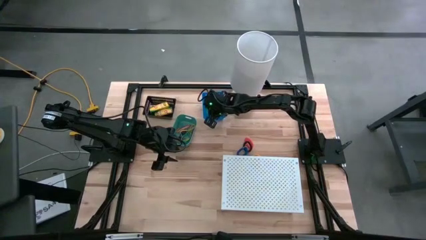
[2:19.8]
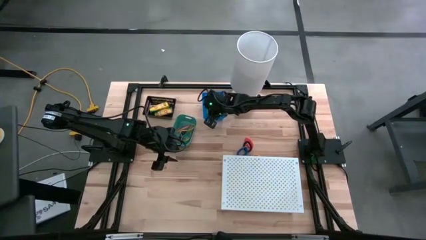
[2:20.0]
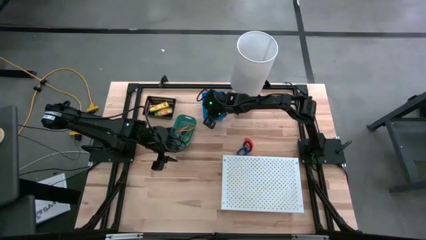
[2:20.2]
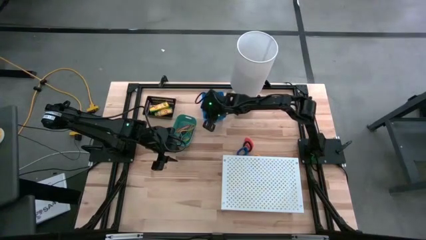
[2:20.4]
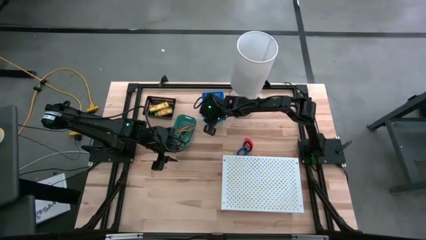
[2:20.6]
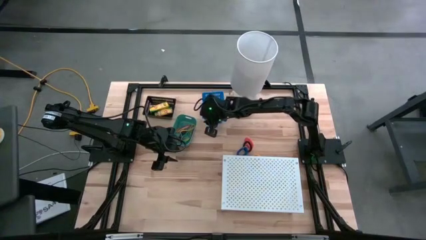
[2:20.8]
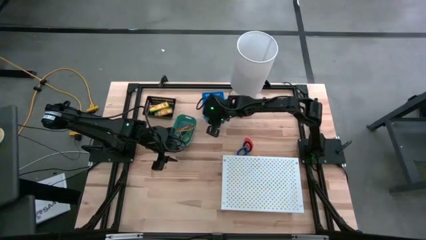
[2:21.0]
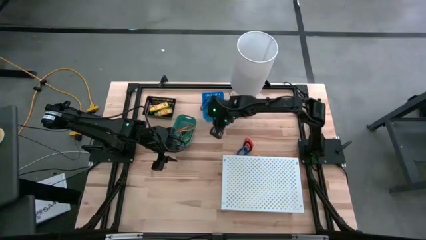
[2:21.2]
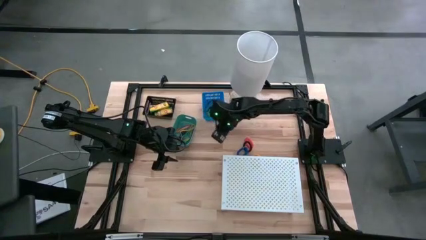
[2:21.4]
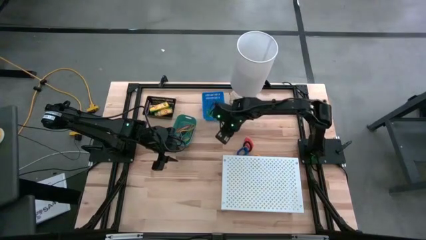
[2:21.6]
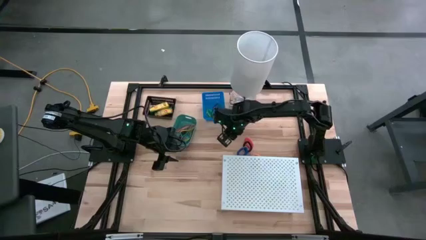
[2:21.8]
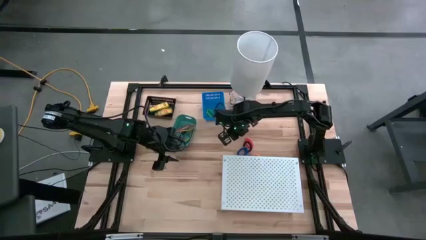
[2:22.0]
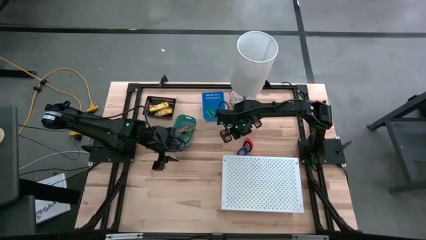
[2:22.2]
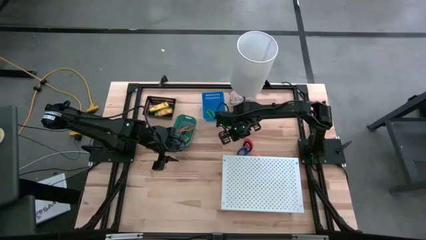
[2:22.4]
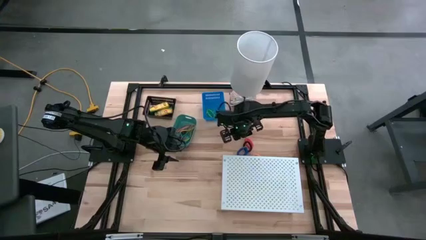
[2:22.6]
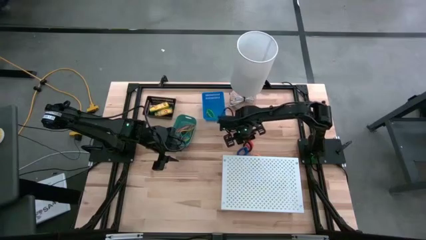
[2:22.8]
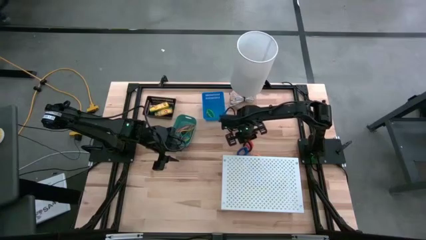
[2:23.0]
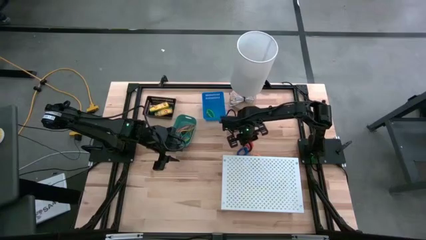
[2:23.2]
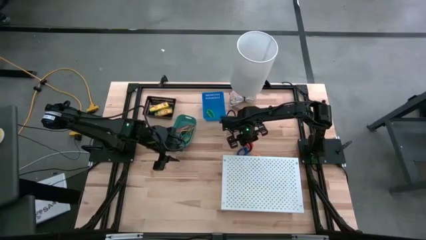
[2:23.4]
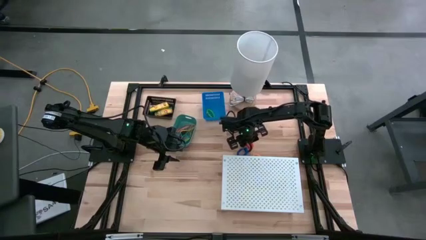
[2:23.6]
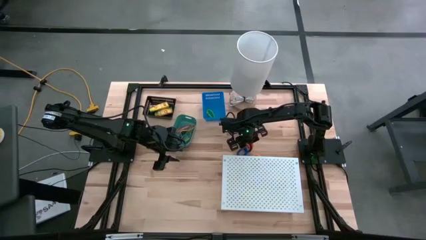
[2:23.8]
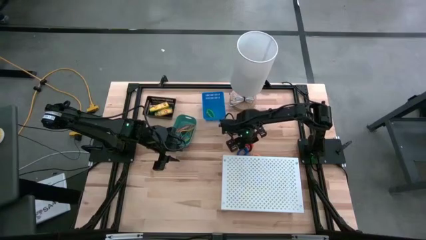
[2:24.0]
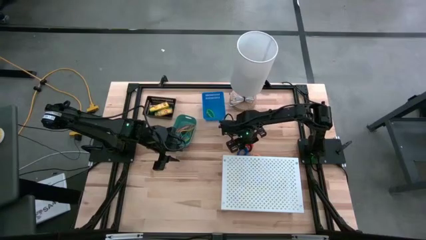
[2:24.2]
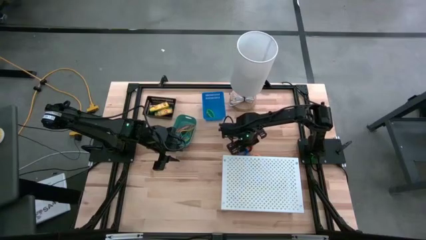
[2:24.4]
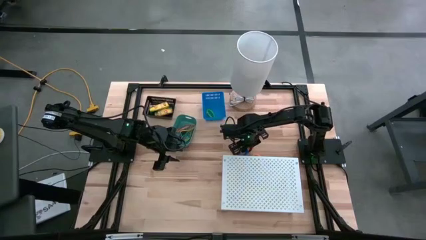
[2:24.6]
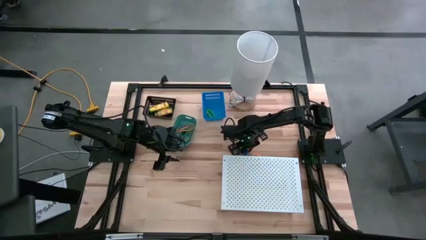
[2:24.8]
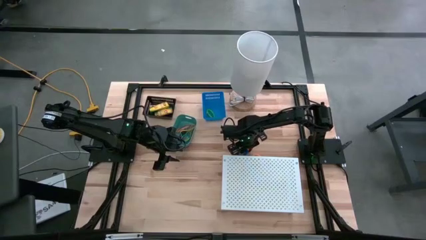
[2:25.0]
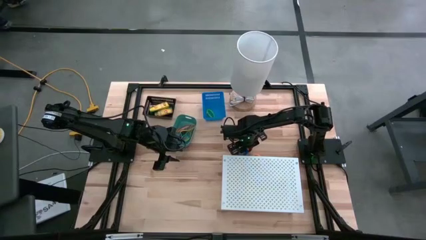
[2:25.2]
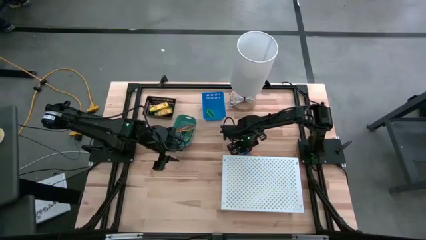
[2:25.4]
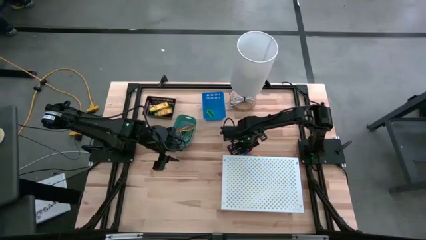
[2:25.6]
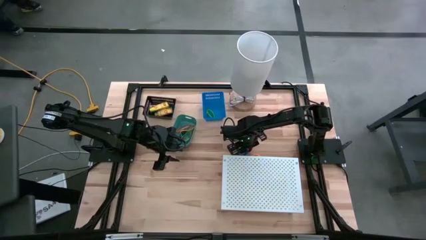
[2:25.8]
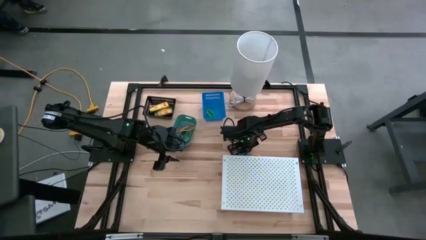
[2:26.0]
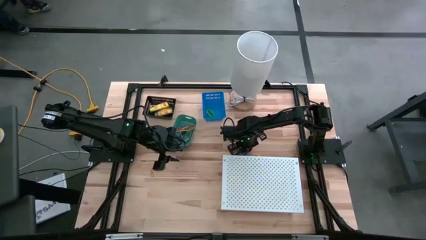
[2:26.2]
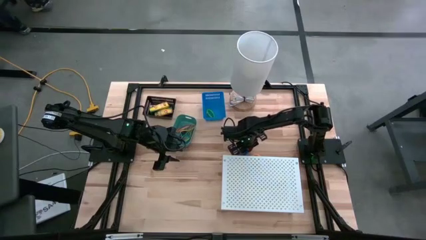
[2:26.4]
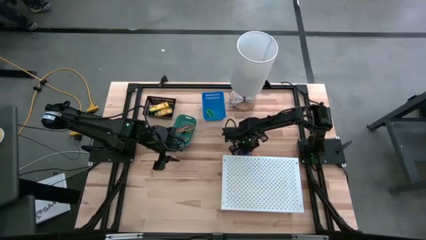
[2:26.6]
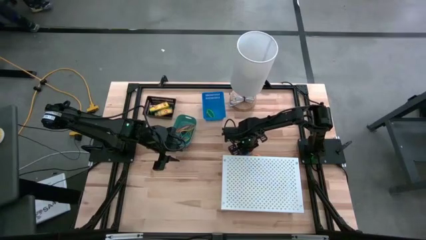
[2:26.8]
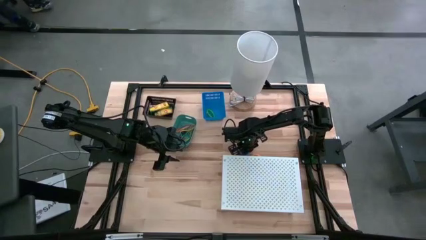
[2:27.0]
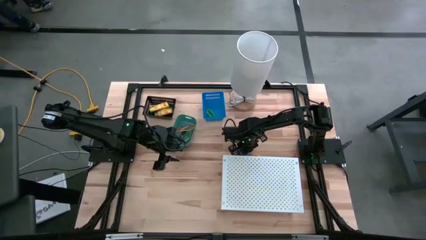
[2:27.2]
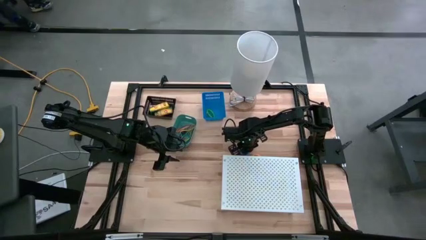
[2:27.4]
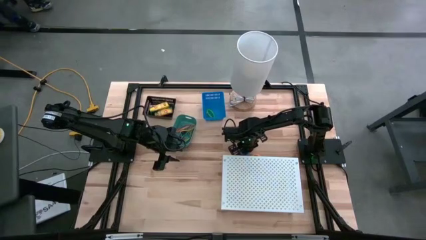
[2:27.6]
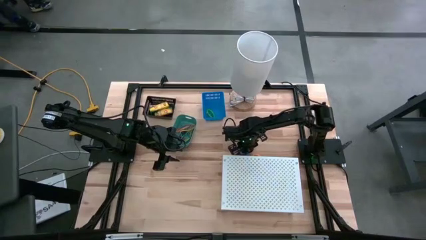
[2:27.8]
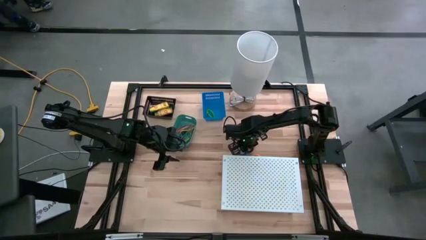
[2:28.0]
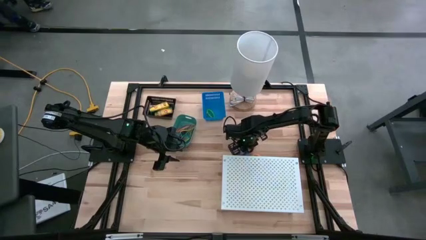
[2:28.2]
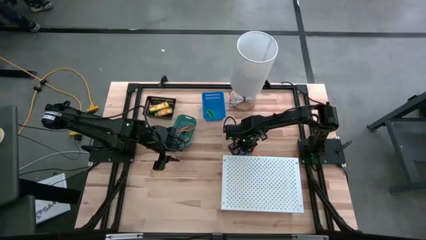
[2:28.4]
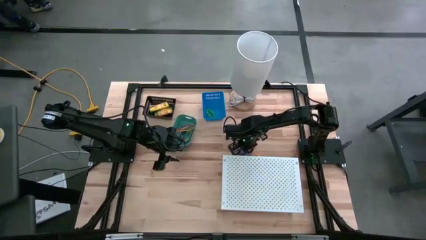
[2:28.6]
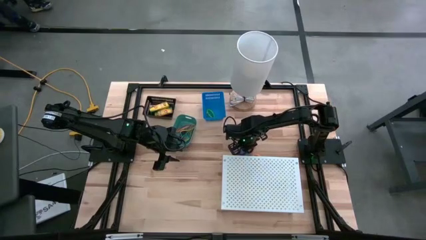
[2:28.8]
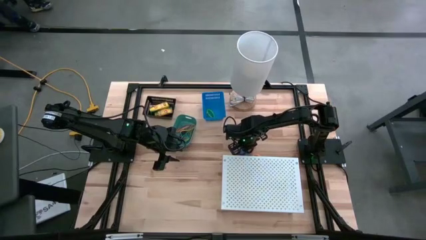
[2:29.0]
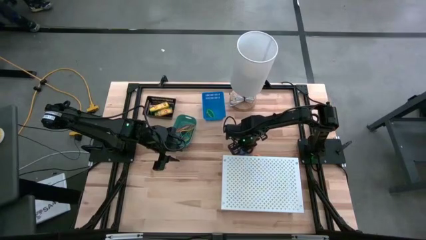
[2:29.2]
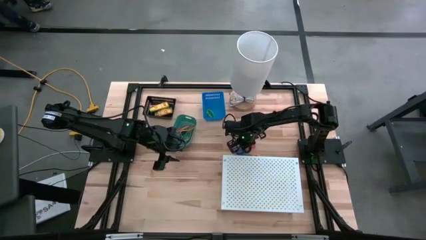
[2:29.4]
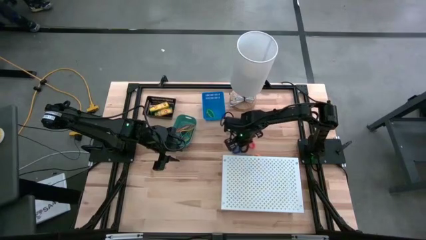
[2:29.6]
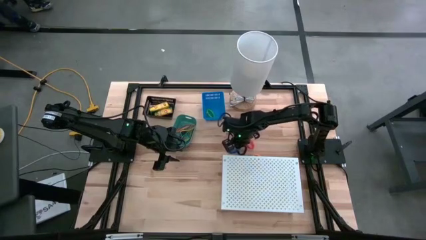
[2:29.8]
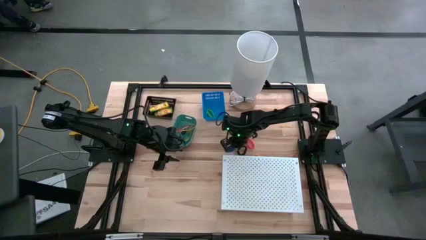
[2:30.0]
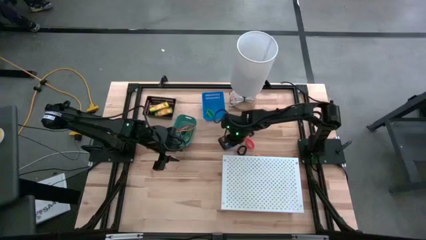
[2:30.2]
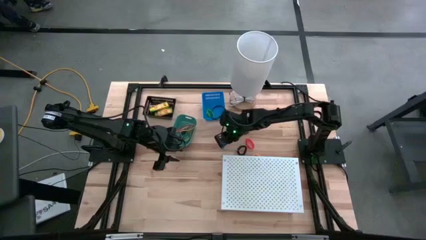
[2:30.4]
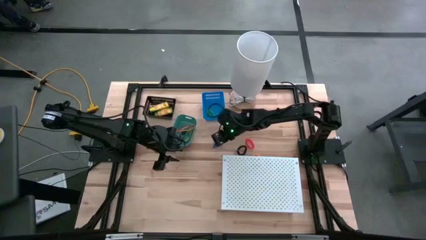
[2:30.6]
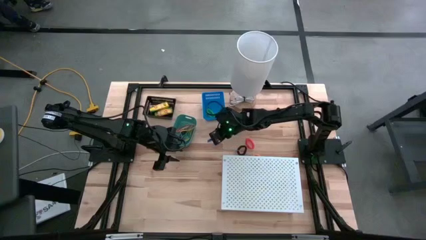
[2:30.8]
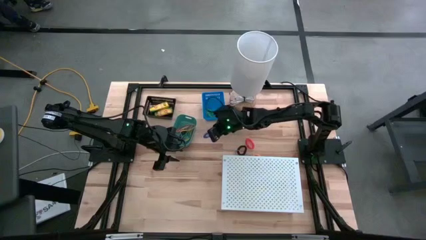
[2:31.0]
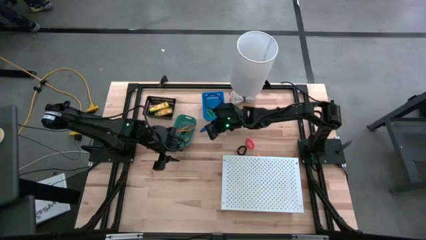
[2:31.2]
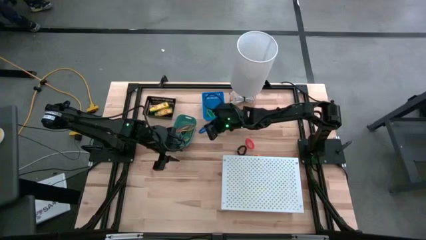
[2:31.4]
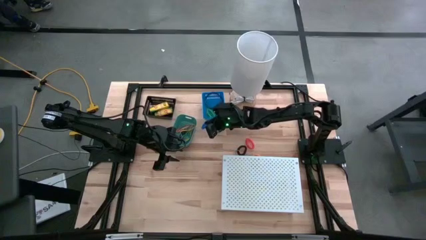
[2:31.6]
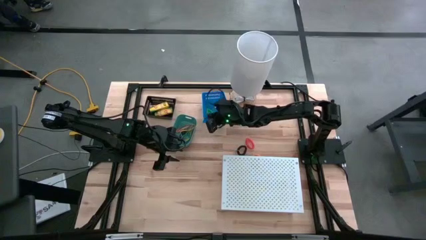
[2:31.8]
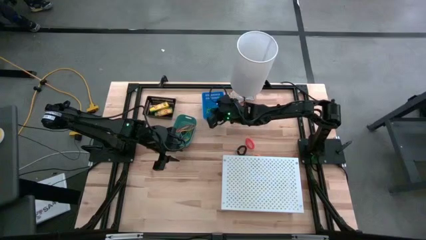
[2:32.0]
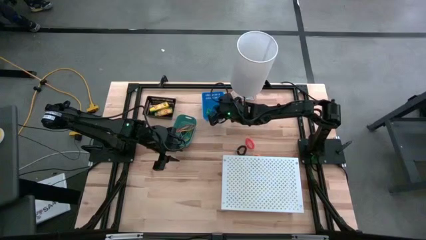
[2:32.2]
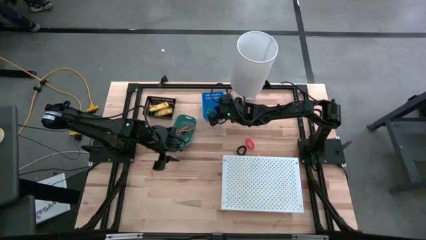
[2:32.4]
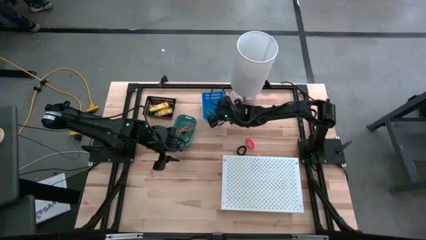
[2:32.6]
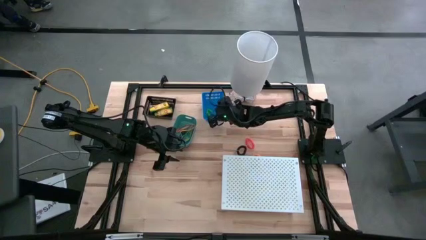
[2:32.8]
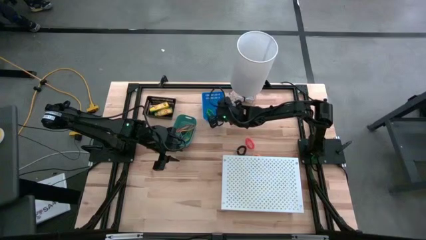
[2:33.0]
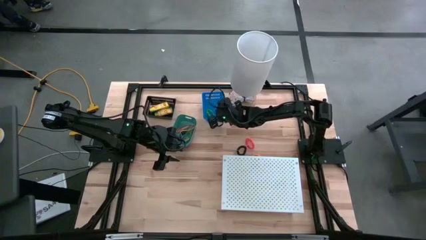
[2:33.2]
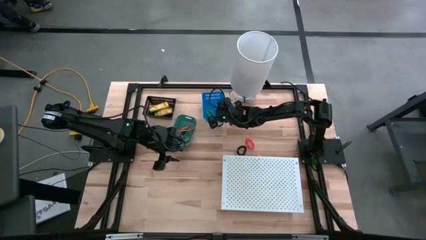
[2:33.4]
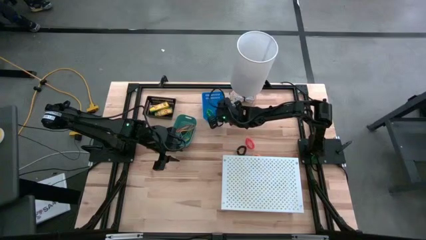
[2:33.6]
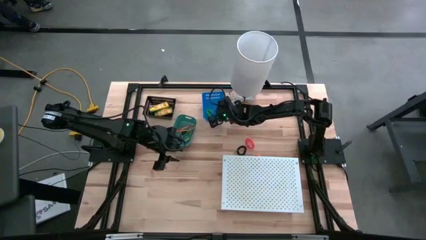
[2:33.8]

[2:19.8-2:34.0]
Task: Pick & Place Office Desk Supplies
Put the blue spring keychain into the blue bin

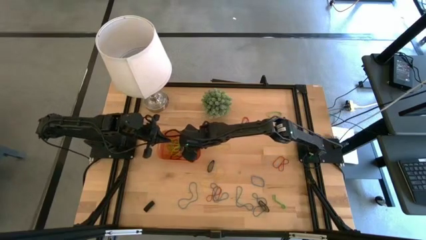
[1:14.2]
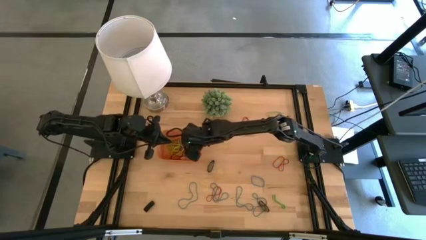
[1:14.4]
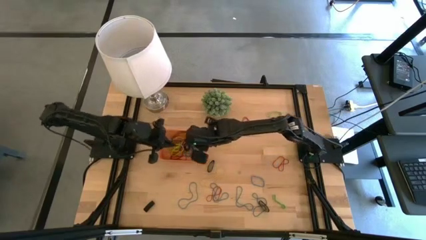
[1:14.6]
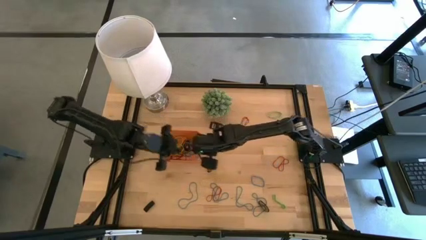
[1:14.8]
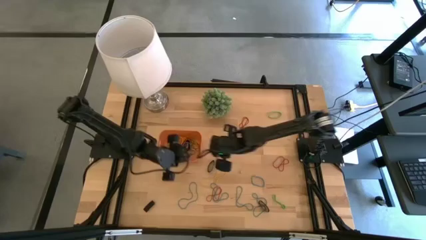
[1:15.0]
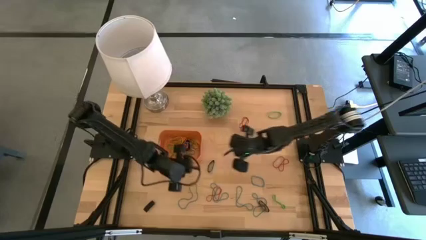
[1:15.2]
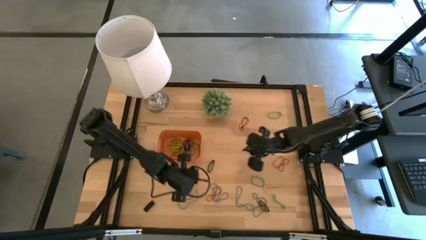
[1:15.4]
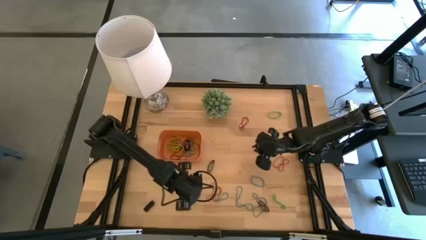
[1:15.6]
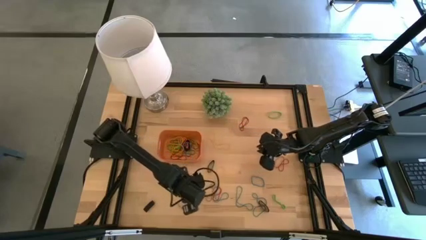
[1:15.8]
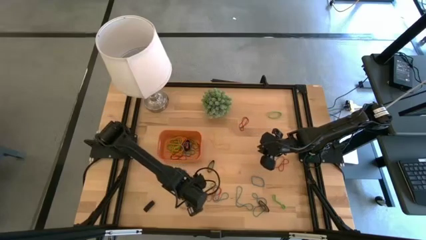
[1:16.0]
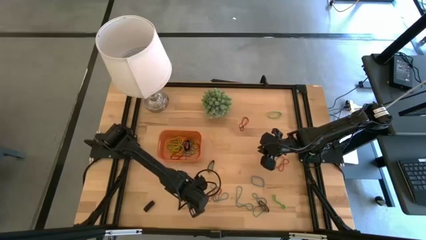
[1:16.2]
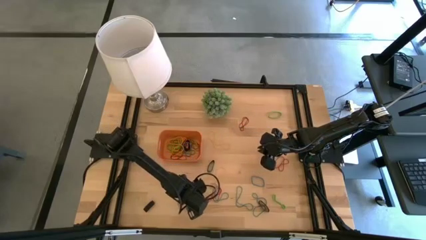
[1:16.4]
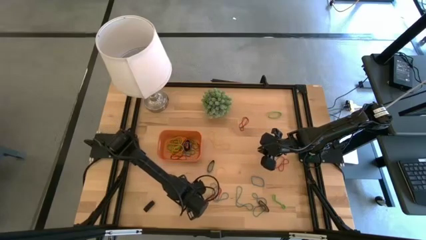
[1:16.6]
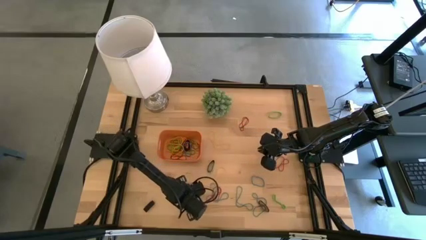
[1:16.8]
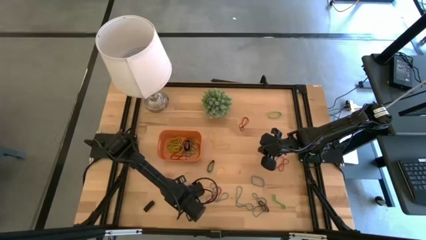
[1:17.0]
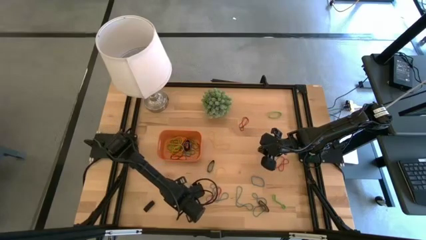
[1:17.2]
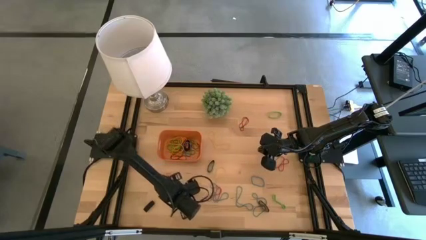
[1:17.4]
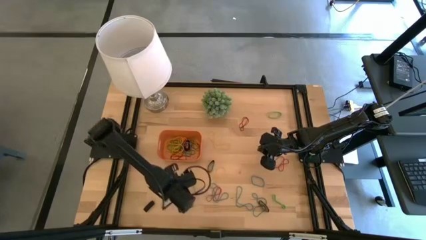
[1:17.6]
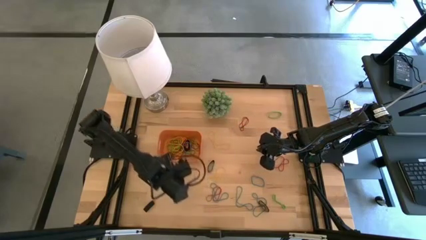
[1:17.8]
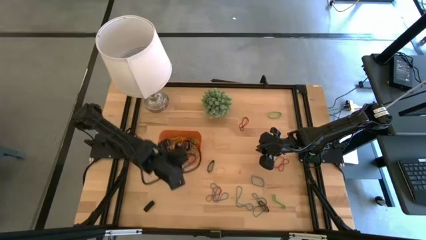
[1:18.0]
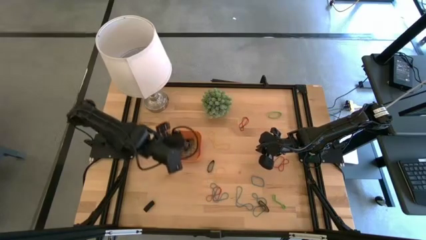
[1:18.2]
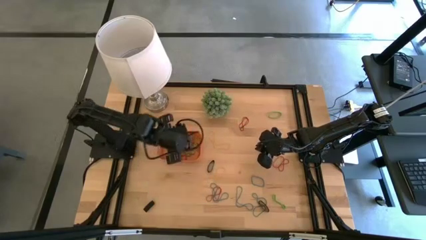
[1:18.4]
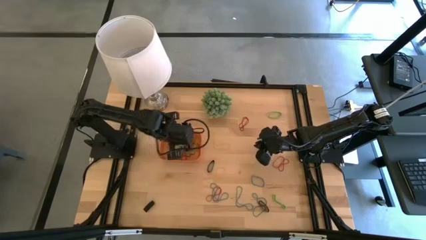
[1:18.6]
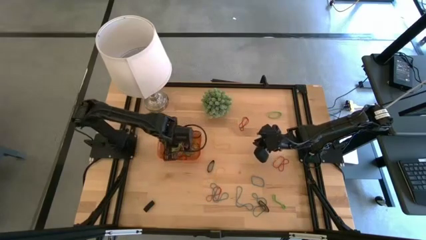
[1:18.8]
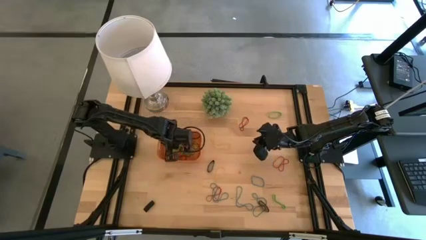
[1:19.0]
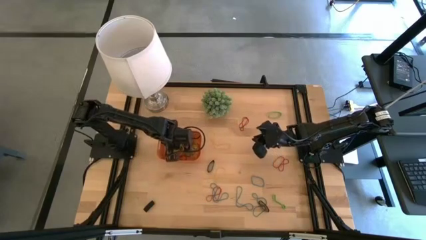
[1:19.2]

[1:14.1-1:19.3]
Task: Pick and place rubber bands into bin
Put the blue rubber band into the orange bin
